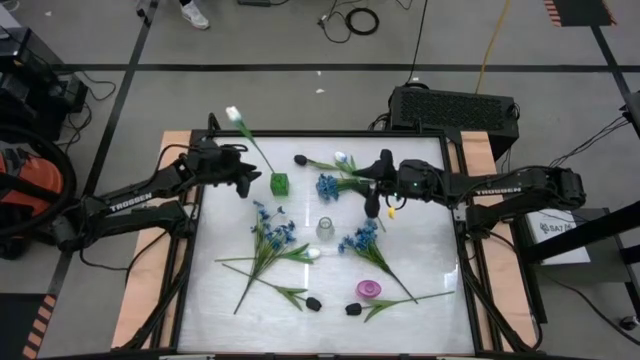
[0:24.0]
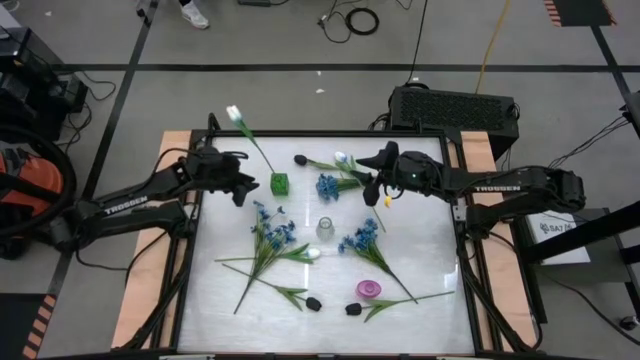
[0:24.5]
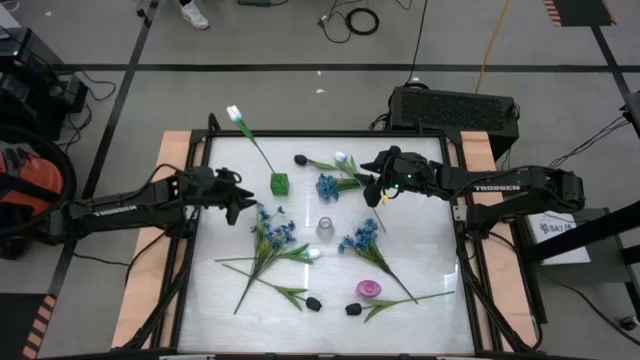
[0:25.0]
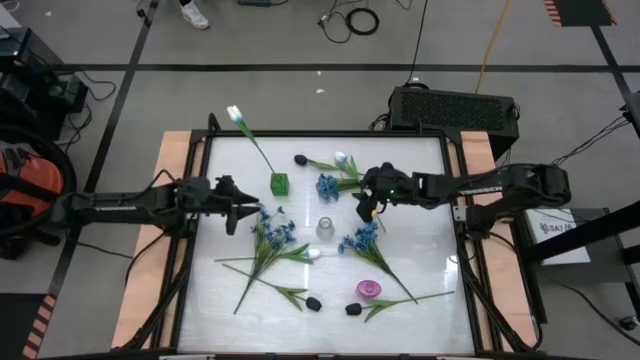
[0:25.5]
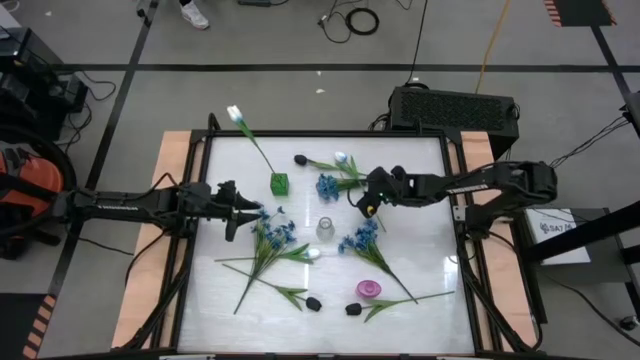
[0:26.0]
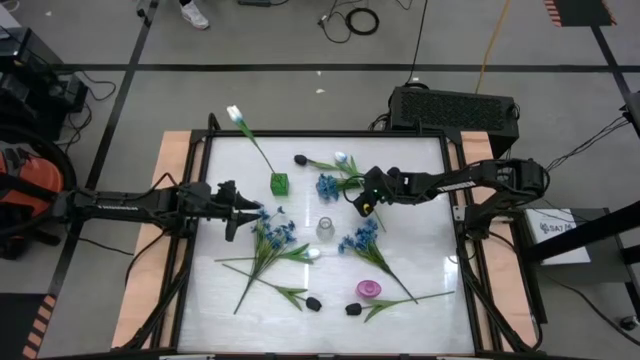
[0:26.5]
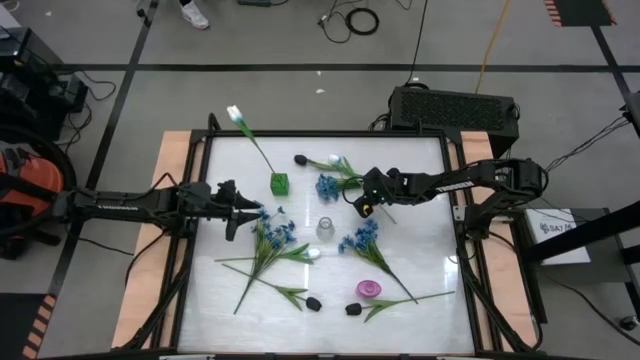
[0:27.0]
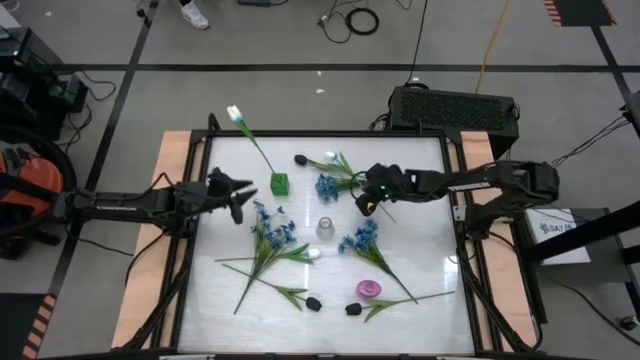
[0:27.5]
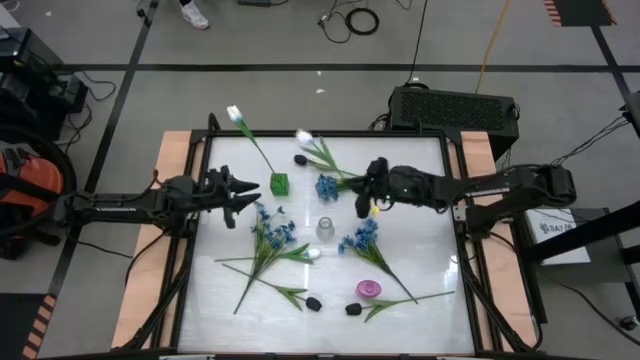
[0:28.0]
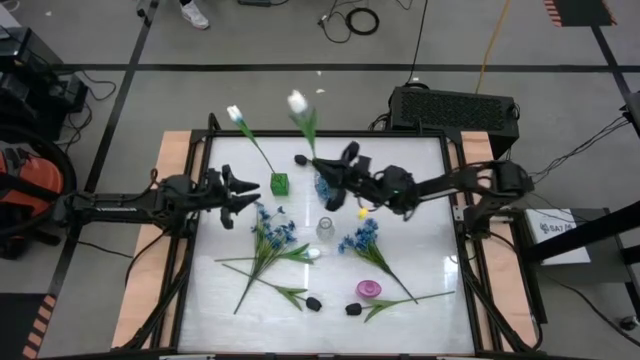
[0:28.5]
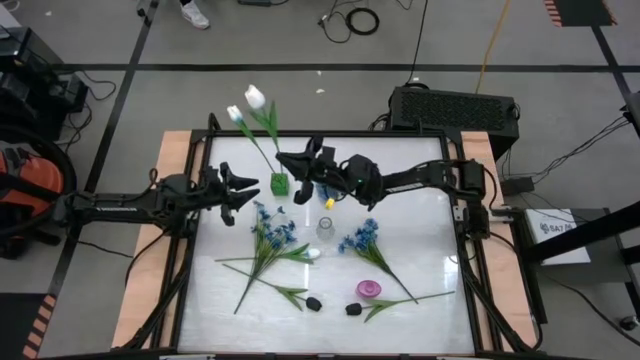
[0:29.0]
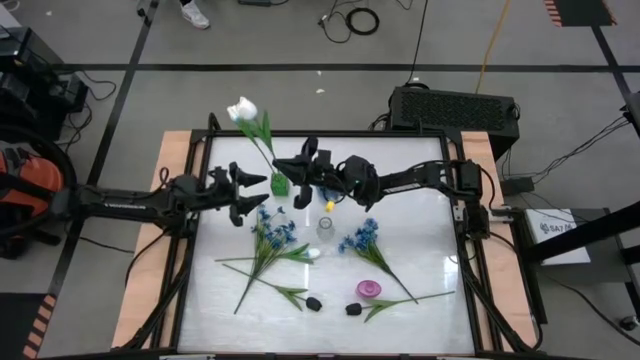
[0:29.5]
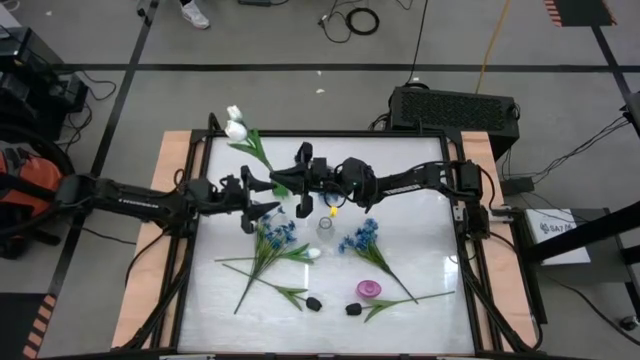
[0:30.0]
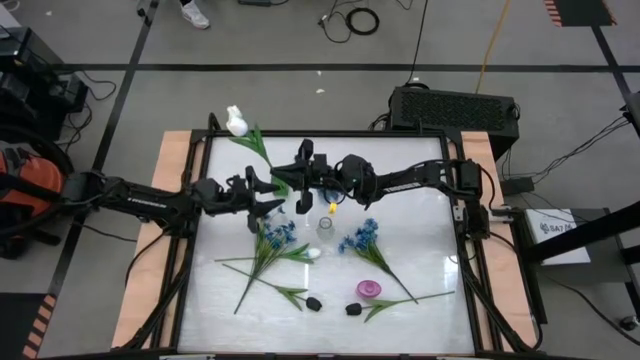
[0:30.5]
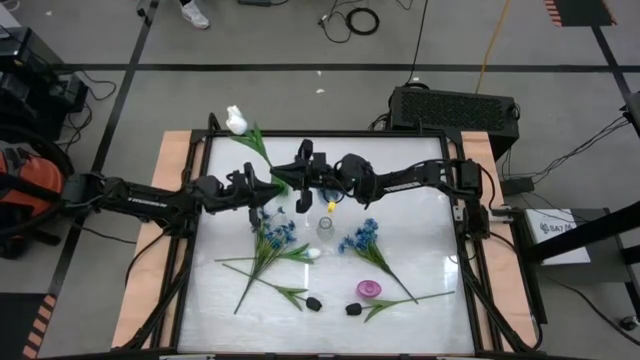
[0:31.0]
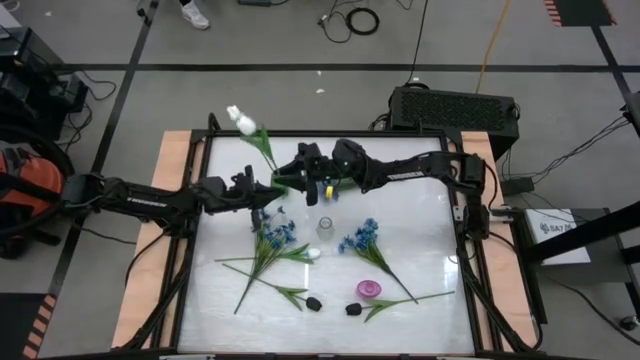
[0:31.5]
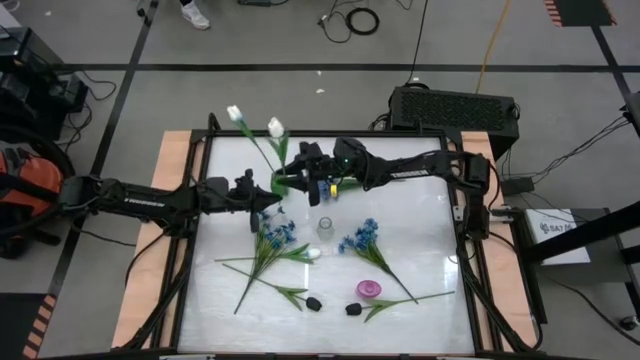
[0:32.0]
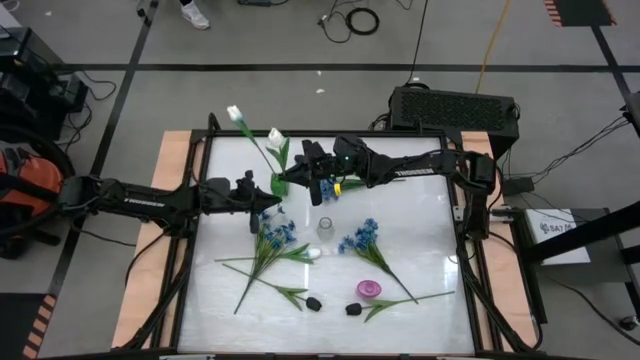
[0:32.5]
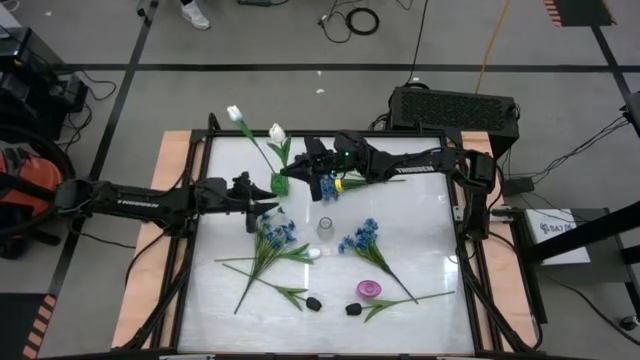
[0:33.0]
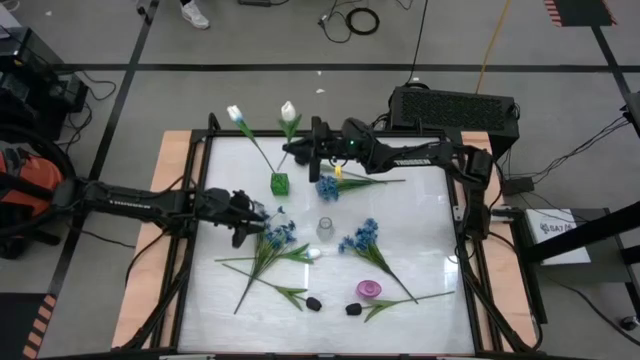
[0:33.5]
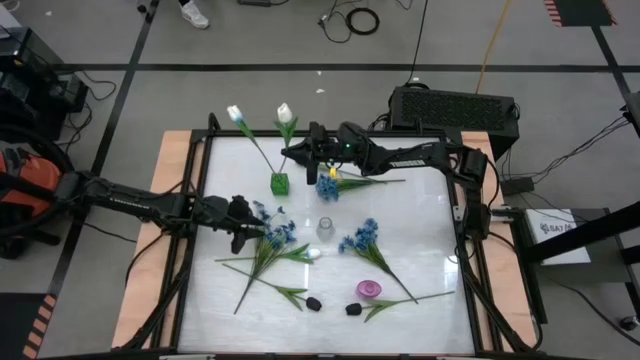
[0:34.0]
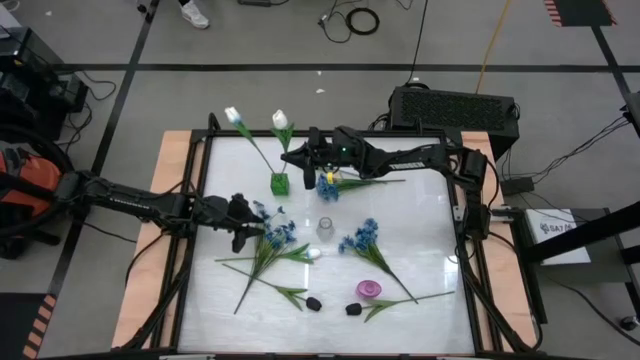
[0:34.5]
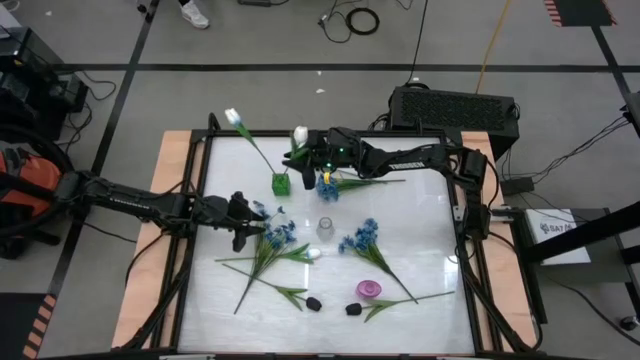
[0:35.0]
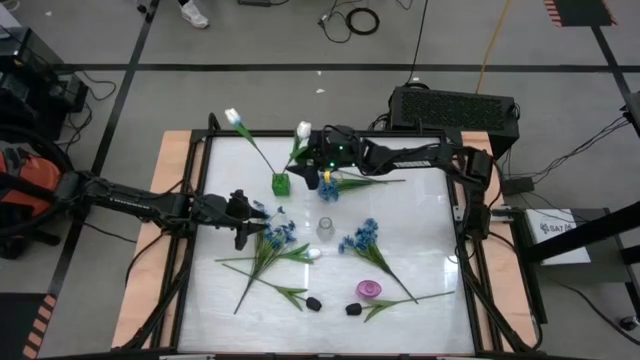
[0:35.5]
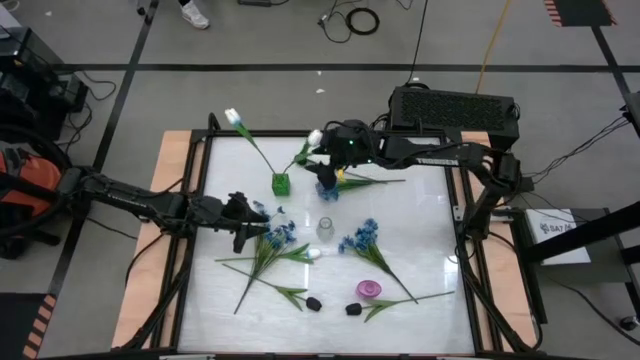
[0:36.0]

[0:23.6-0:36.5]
Task: Sort flowers into vase by color
Put the right white flower into the green vase

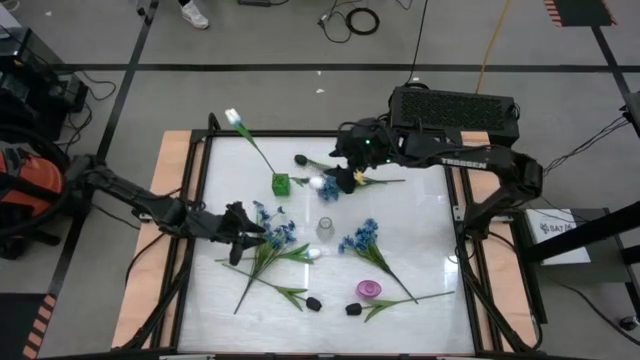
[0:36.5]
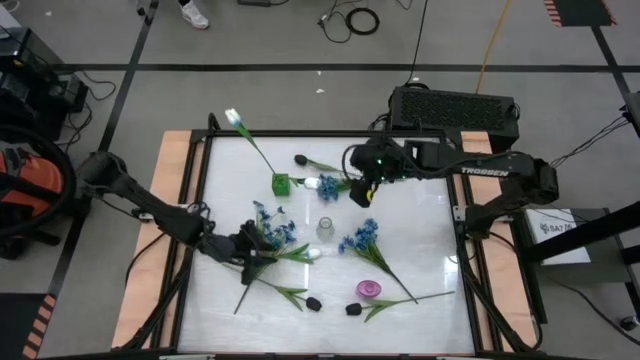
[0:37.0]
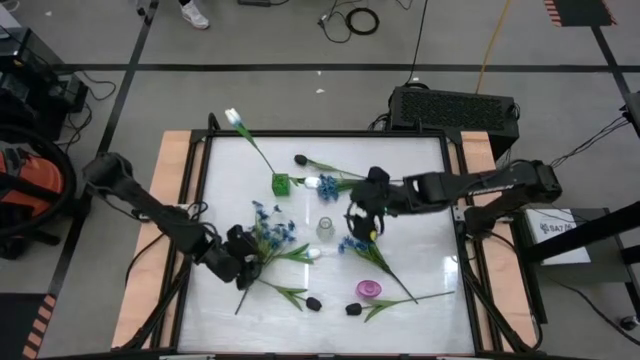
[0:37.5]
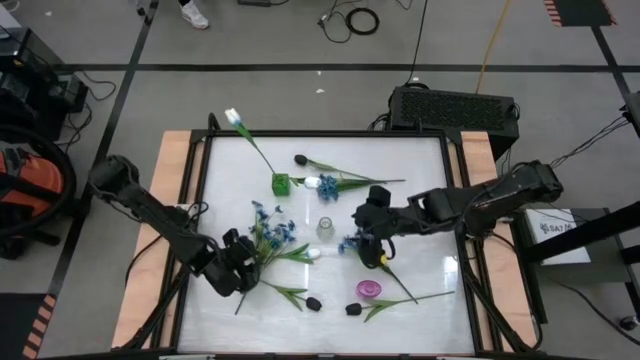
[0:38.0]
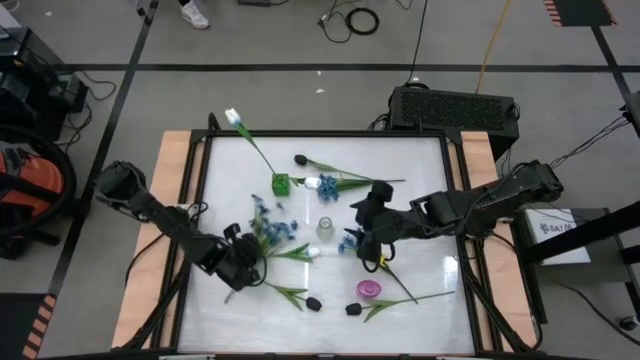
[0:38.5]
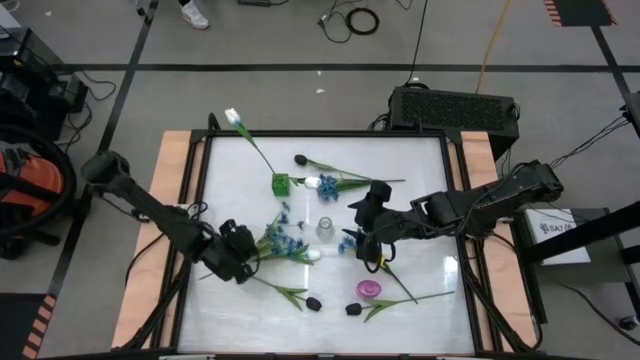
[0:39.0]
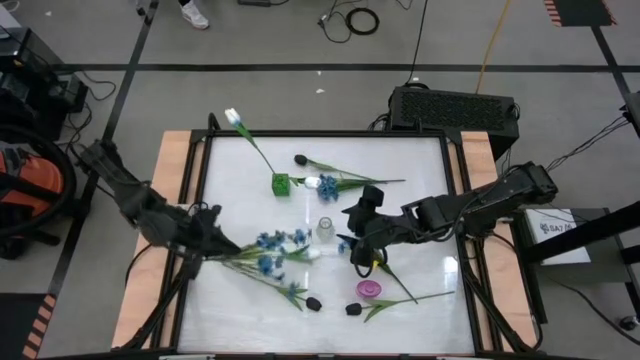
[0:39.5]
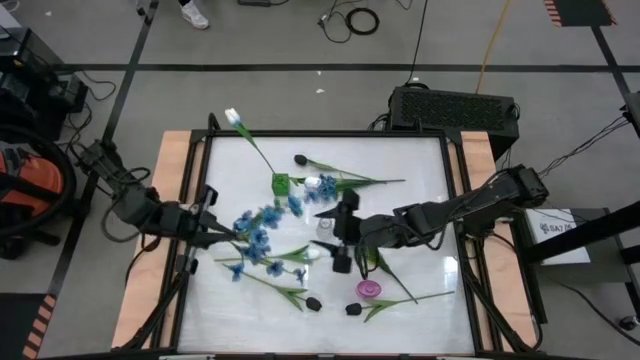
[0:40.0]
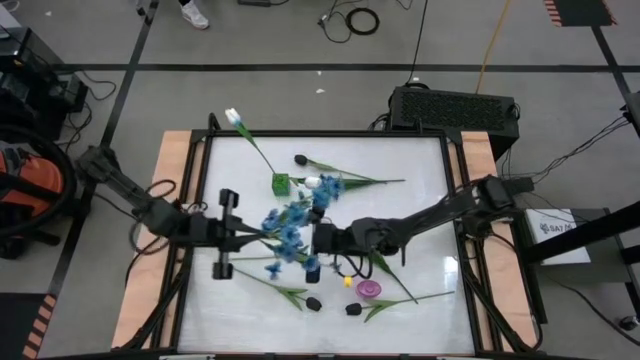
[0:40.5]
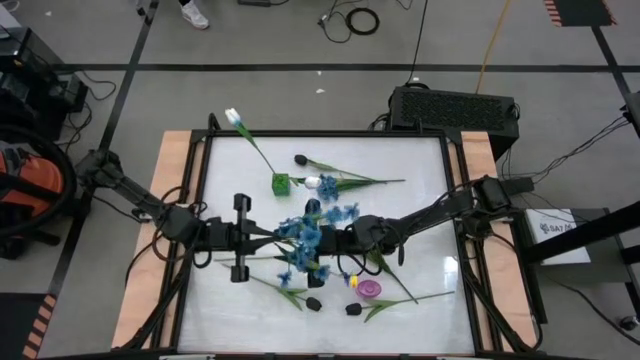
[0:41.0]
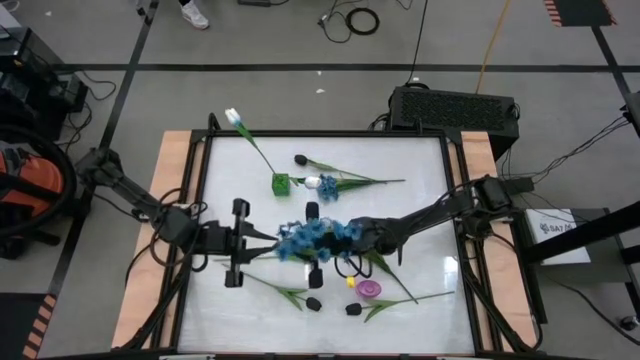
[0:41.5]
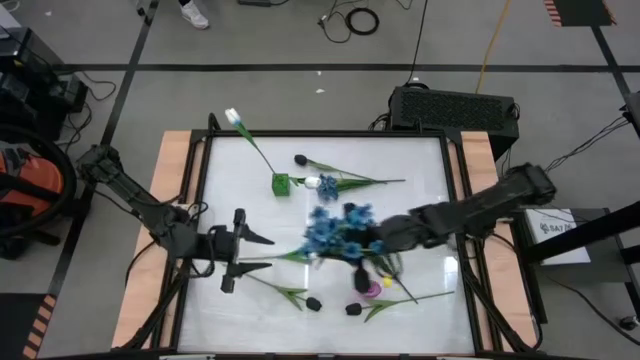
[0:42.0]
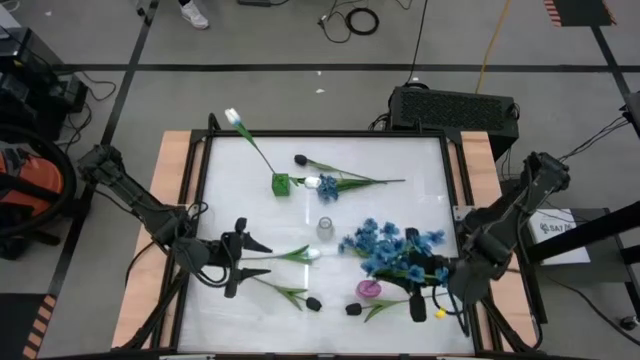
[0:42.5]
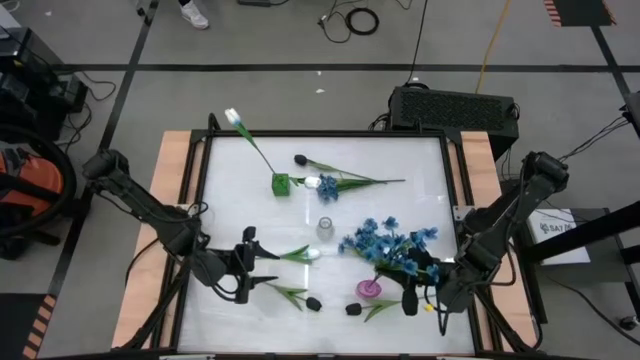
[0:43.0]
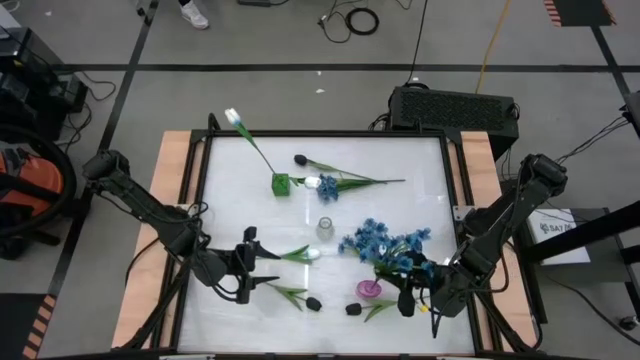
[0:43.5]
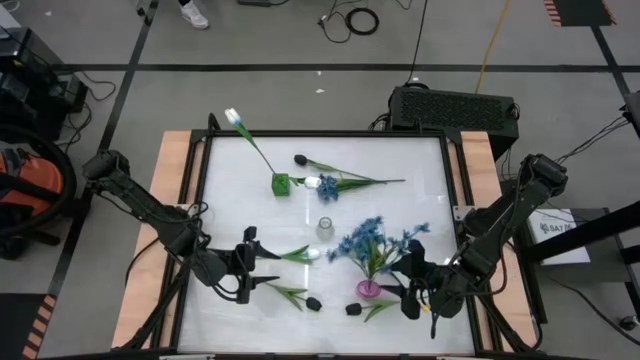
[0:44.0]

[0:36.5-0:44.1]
Put the left blue flowers into the purple vase

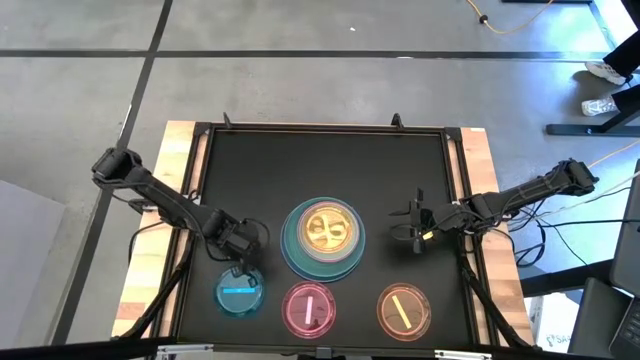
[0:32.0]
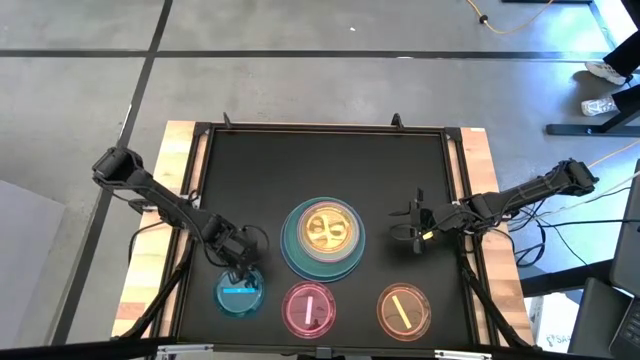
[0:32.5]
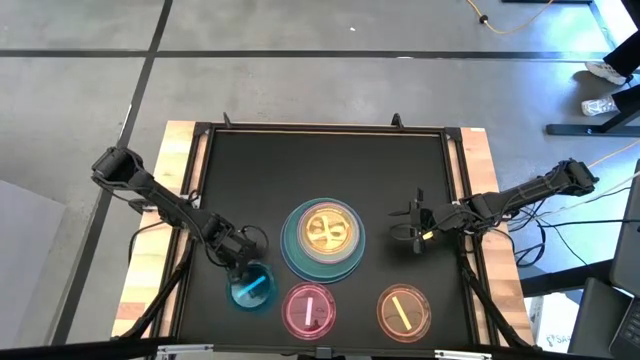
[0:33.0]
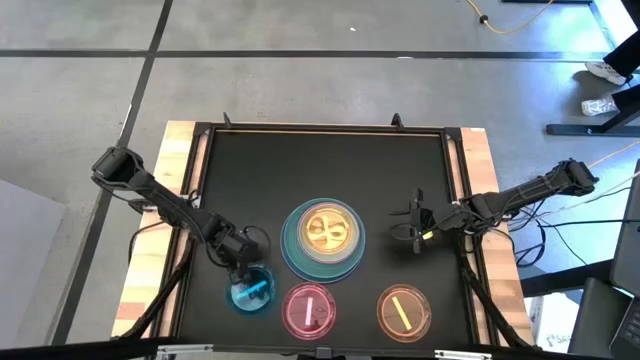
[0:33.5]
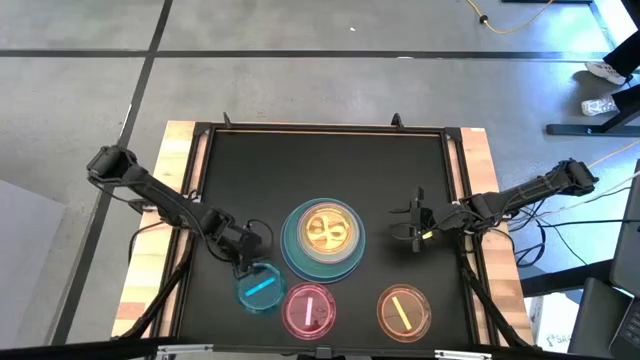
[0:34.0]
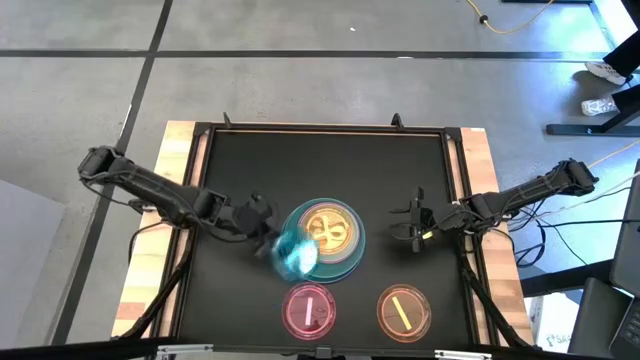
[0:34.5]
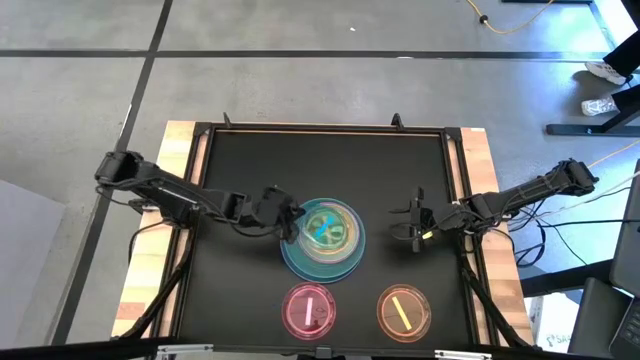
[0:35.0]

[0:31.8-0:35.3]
Task: Stack plastic plates
Stack the small dark blue plate on the small orange plate
